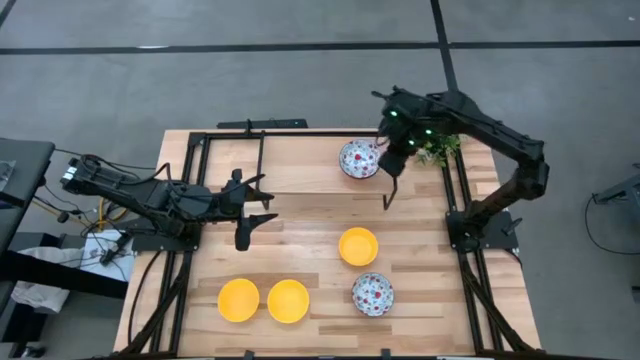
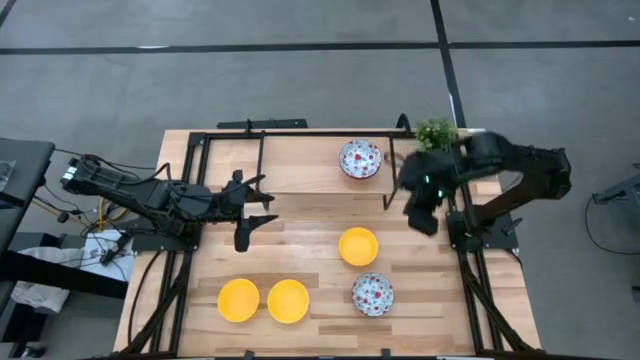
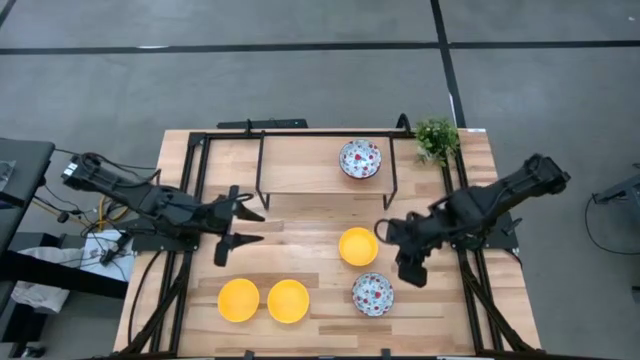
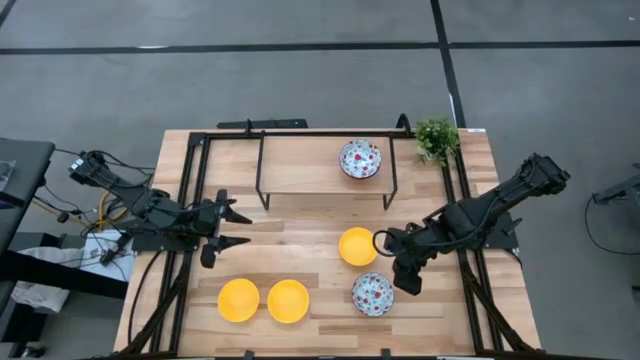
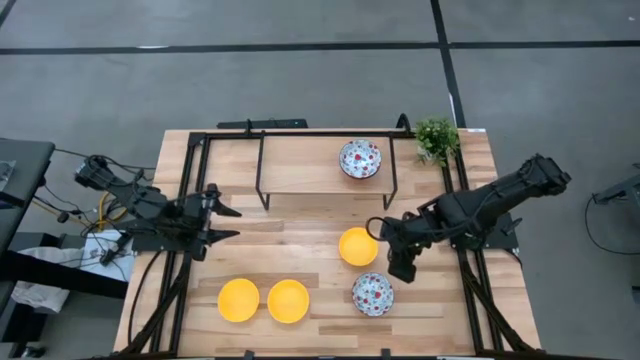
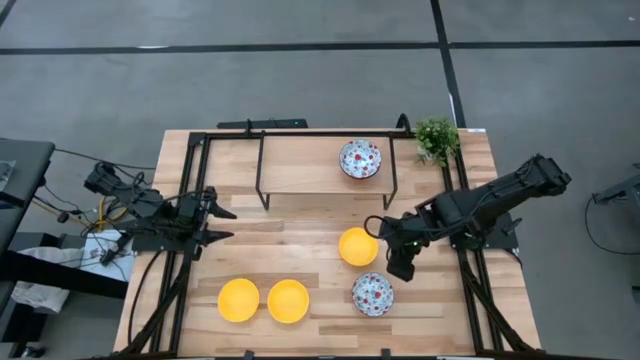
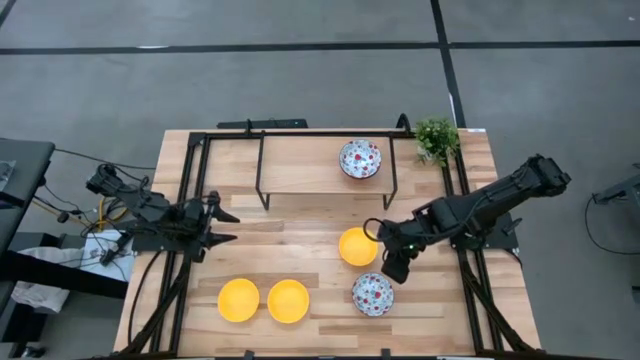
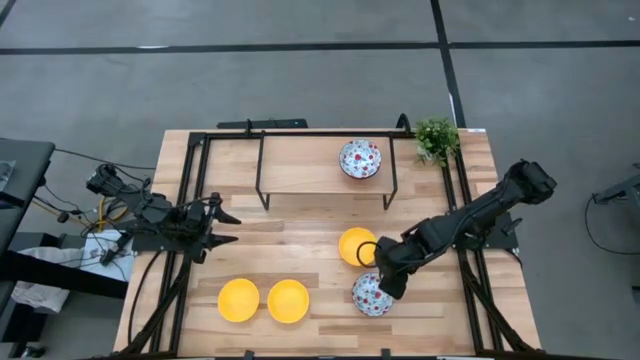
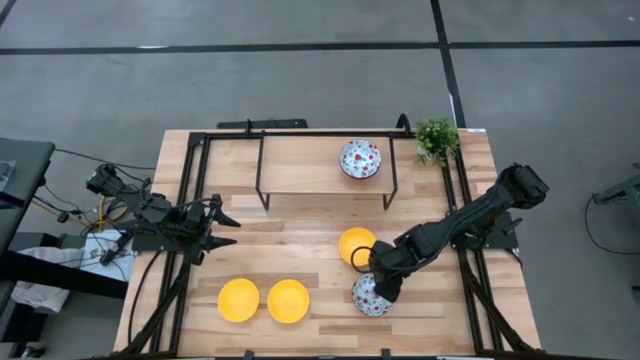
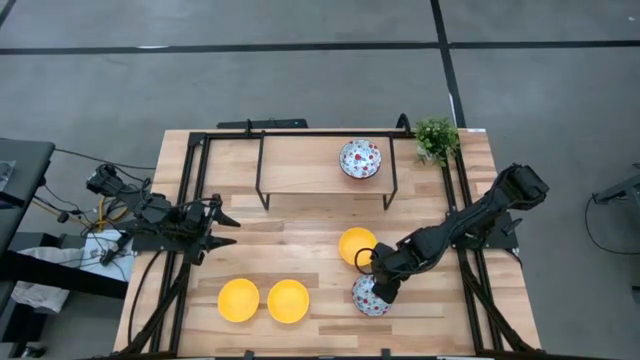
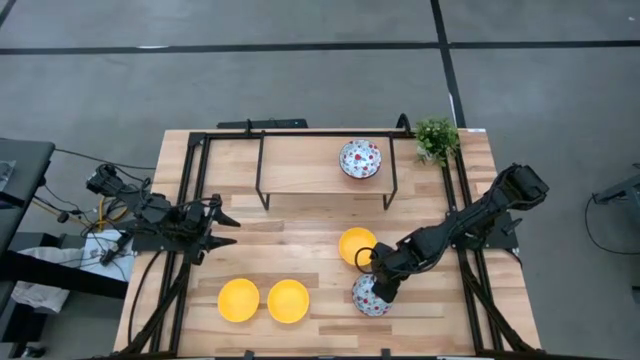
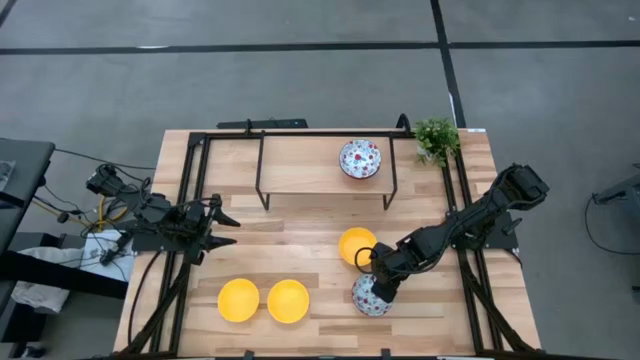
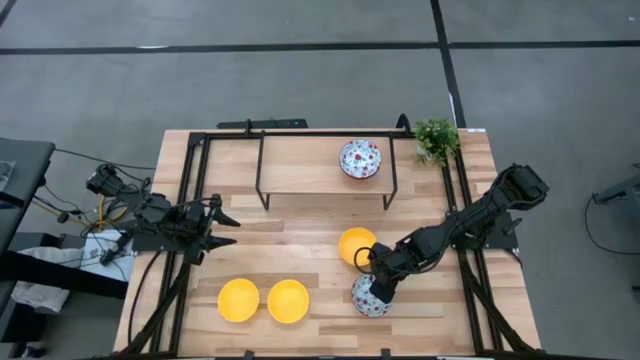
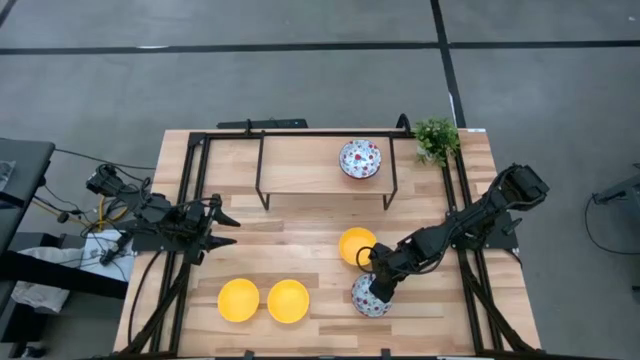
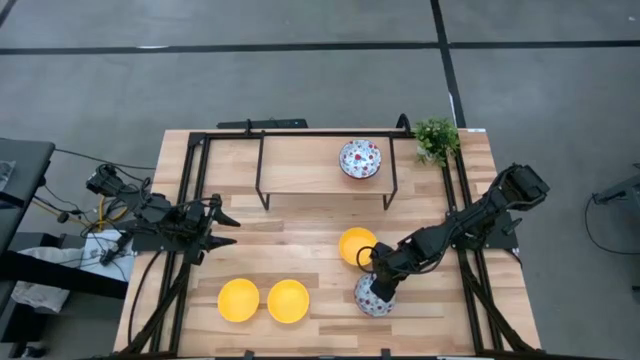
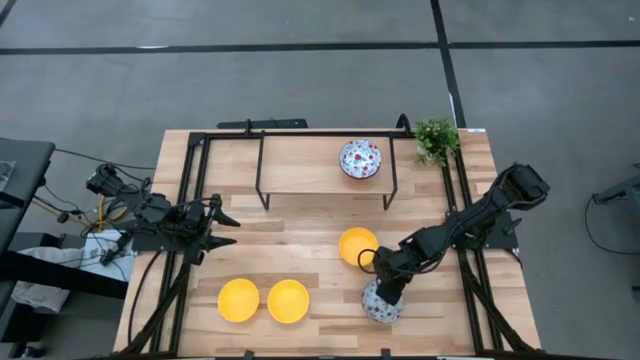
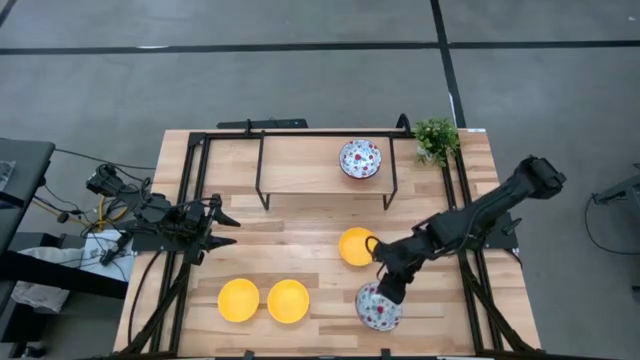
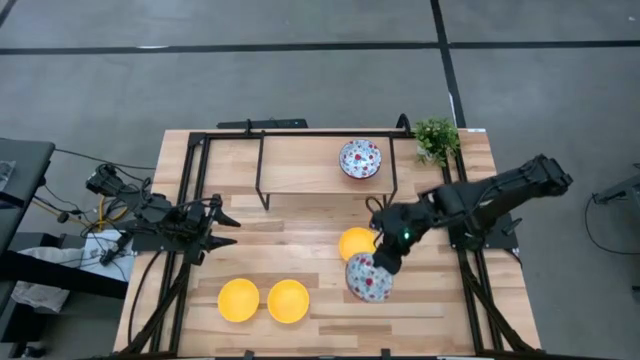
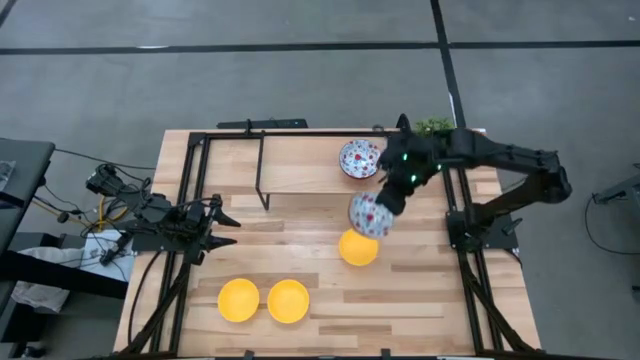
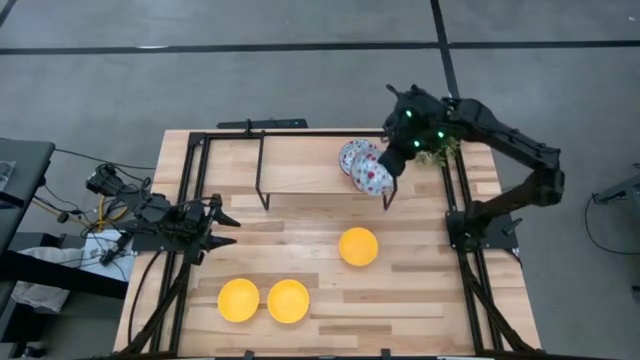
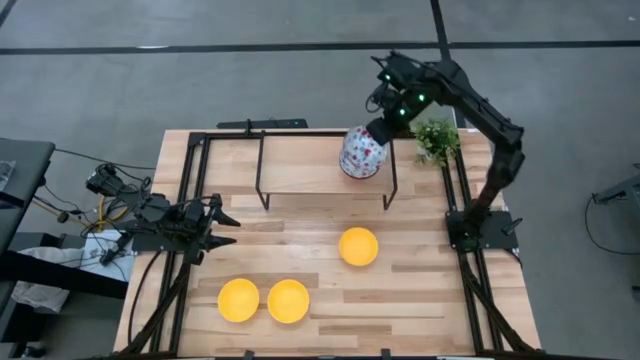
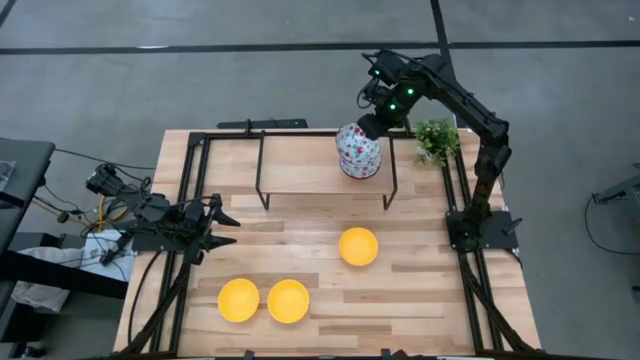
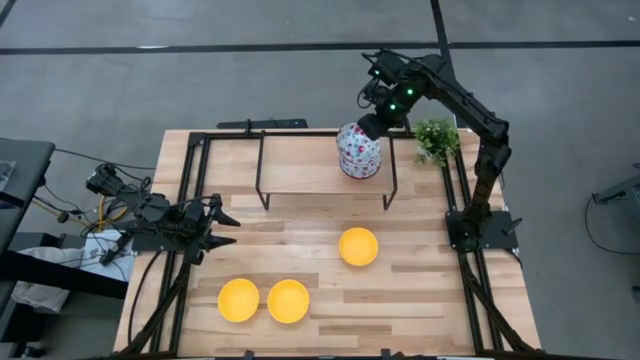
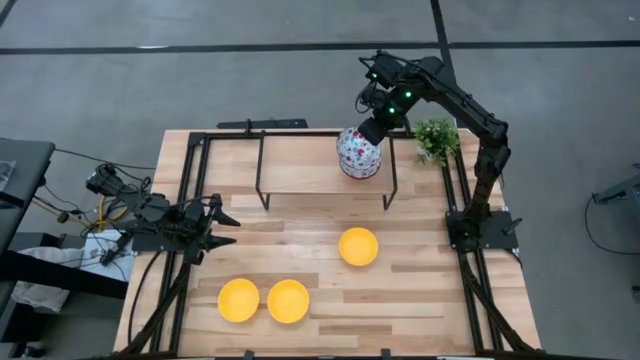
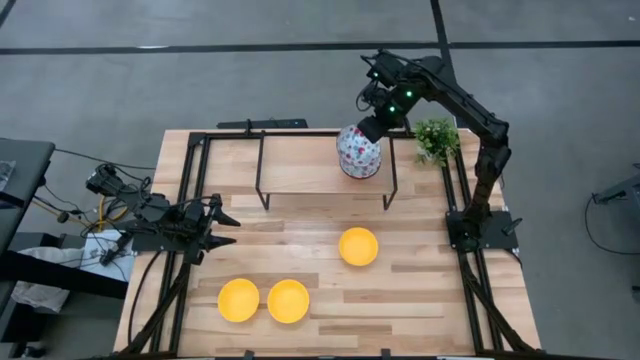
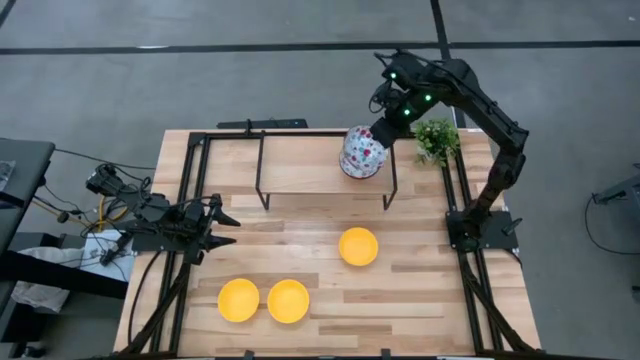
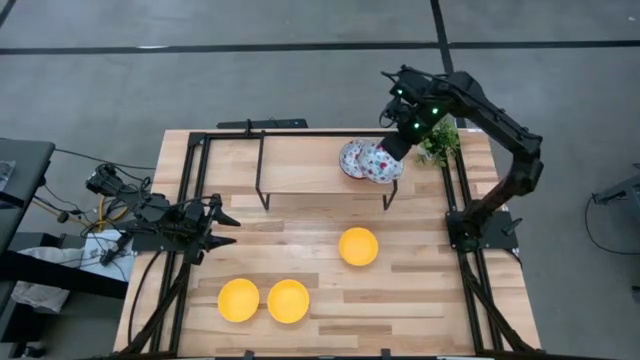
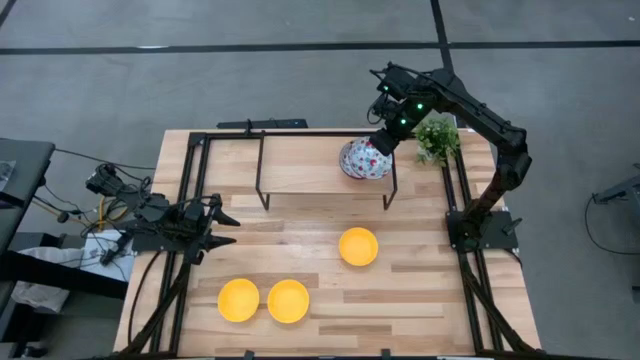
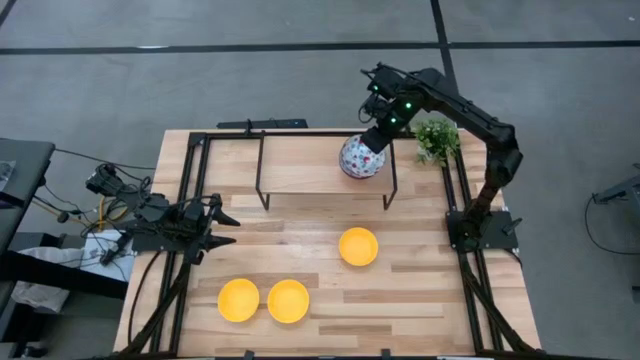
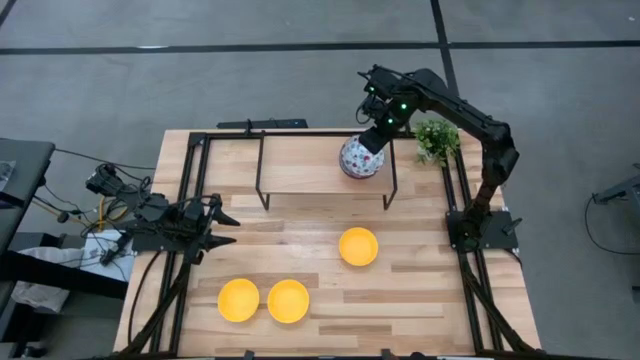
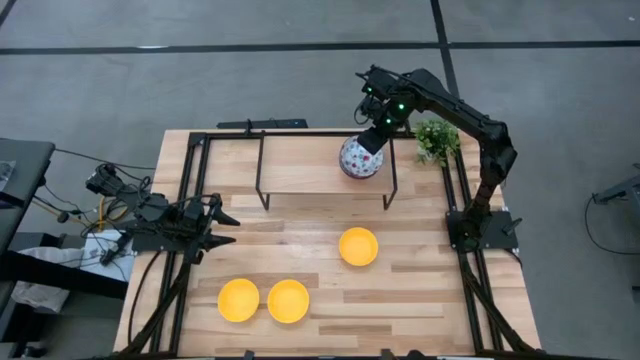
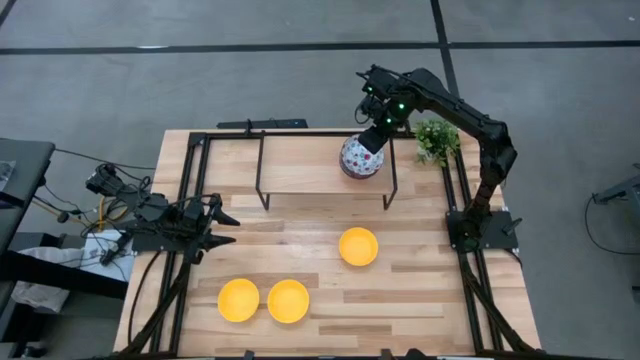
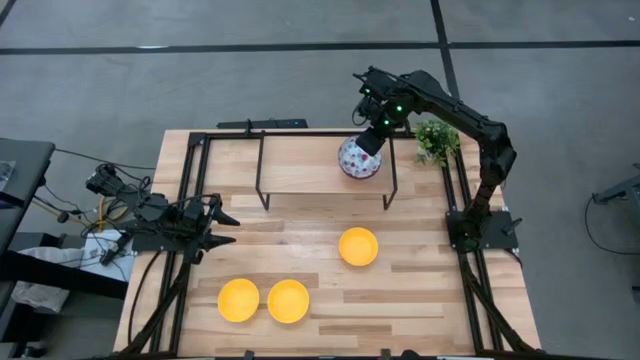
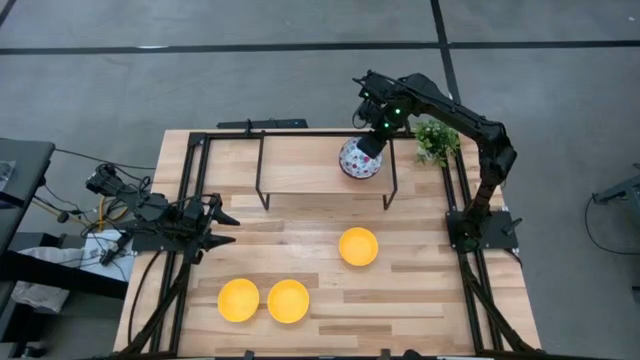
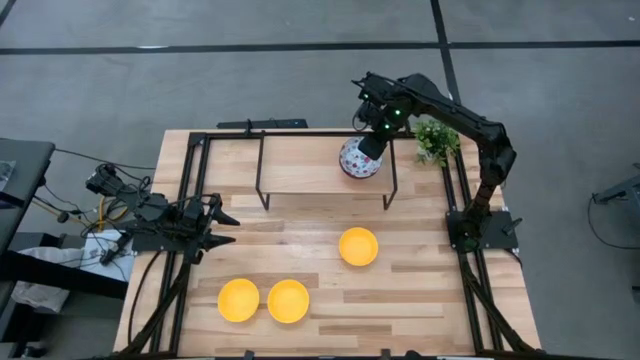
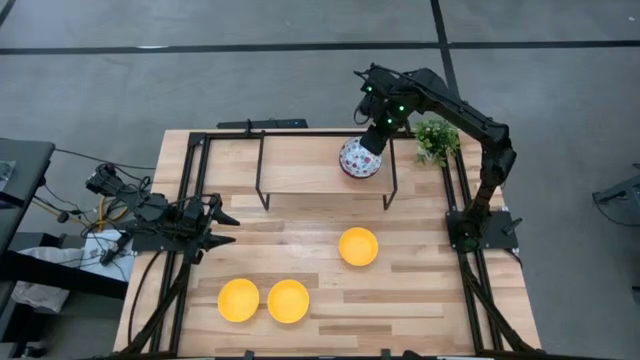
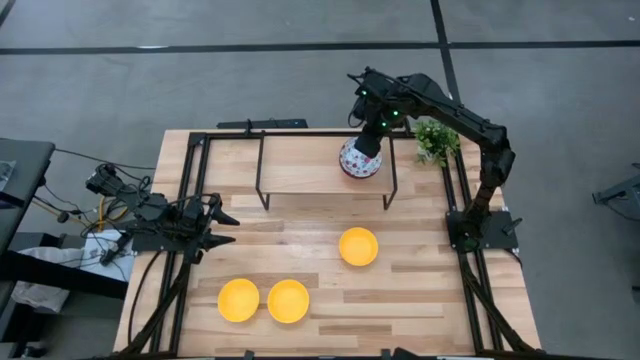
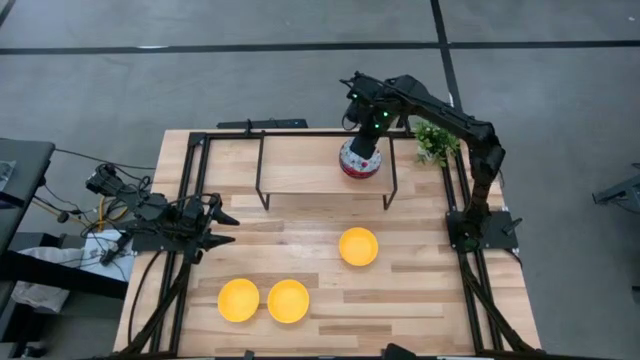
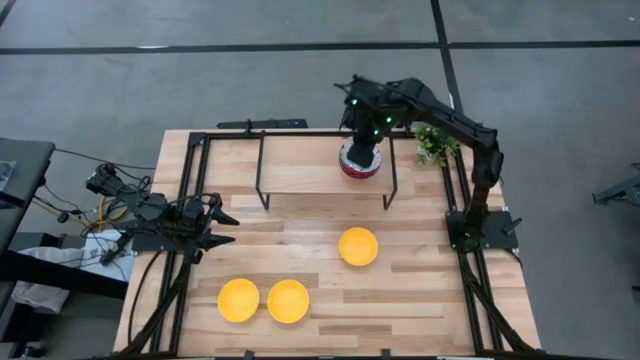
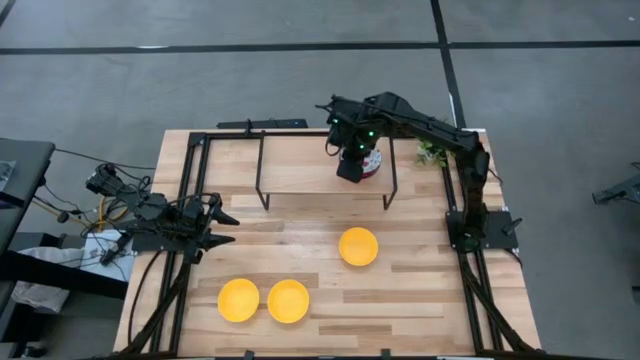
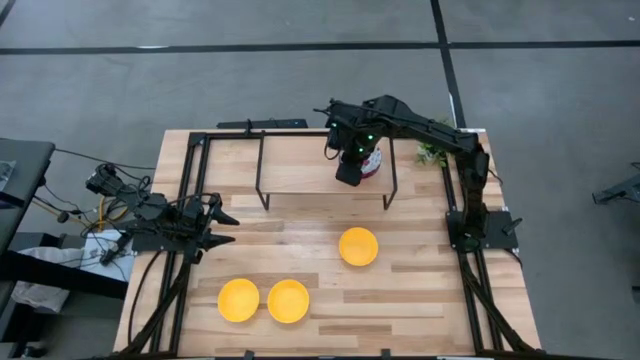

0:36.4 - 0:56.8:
Task: Pick & Place Mini bowls
Stack the red bowl on the red bowls on the shelf
